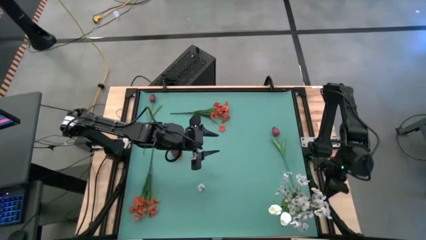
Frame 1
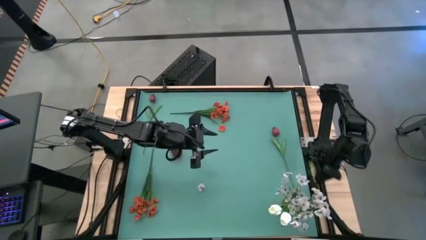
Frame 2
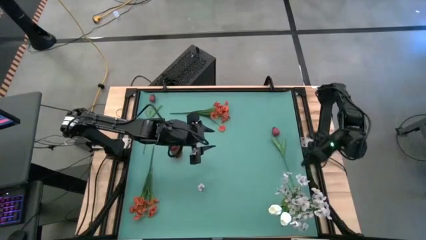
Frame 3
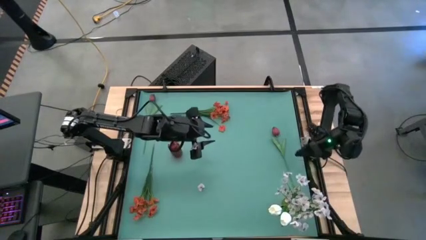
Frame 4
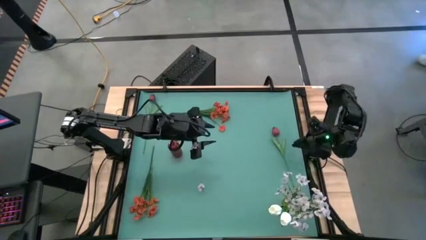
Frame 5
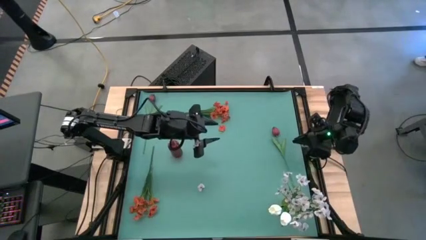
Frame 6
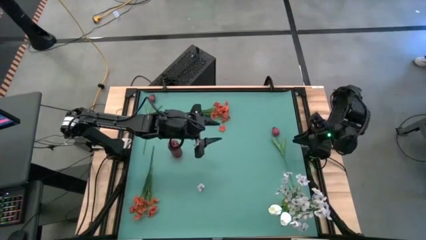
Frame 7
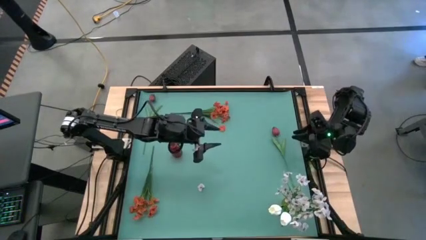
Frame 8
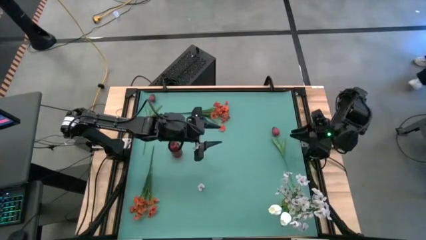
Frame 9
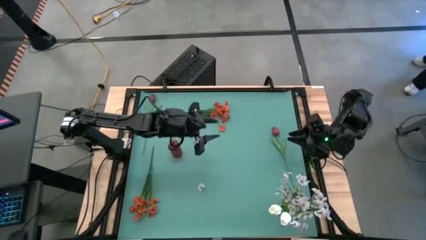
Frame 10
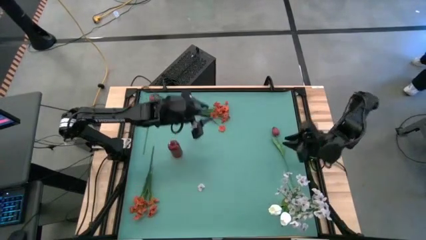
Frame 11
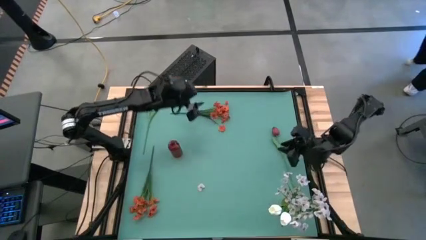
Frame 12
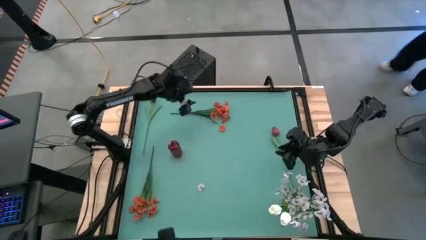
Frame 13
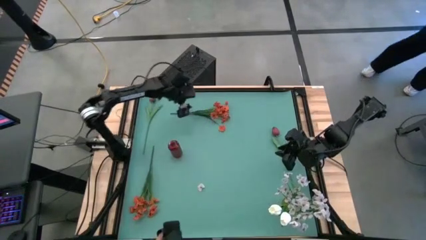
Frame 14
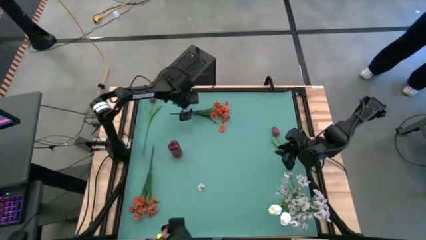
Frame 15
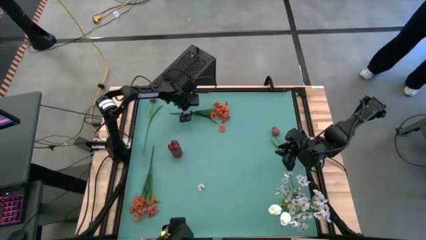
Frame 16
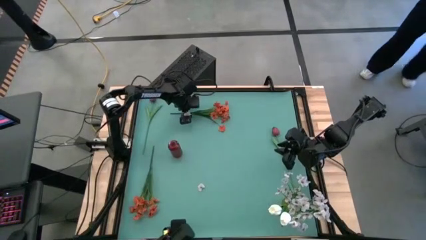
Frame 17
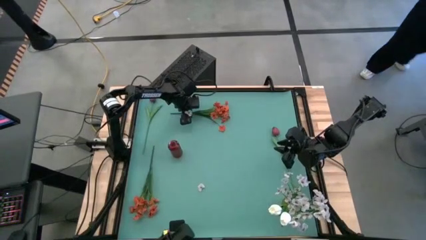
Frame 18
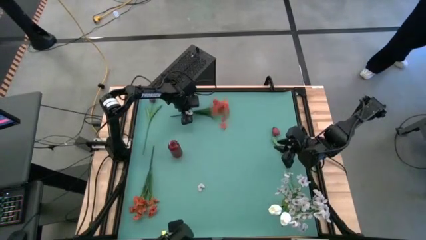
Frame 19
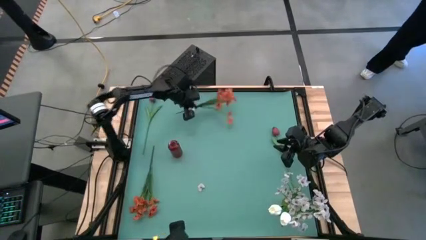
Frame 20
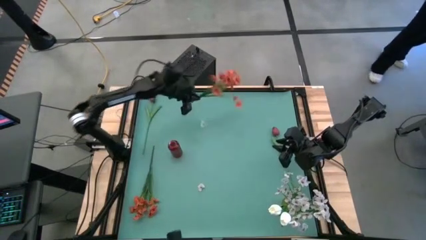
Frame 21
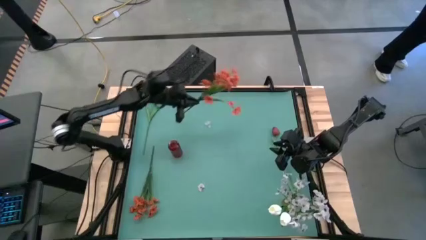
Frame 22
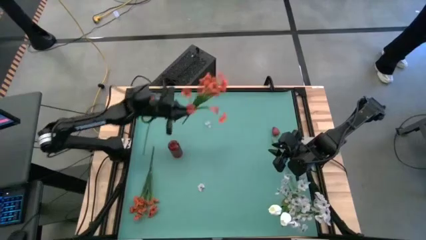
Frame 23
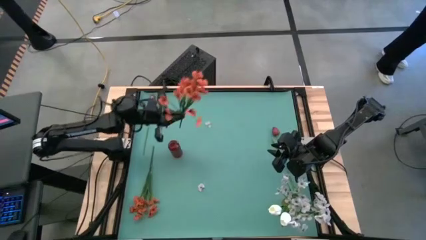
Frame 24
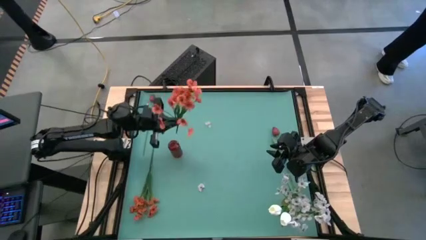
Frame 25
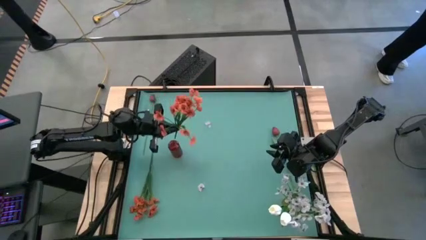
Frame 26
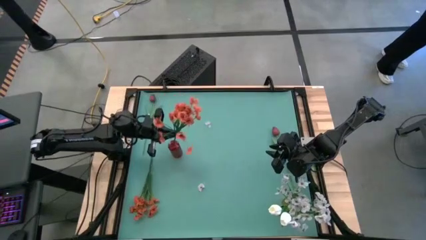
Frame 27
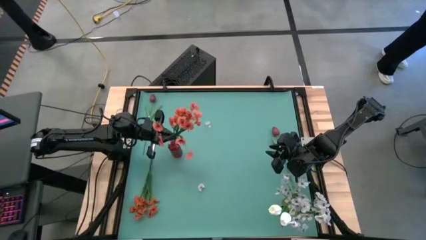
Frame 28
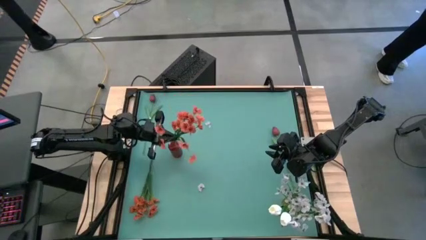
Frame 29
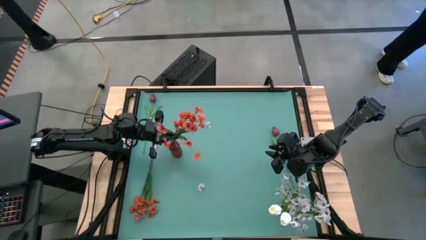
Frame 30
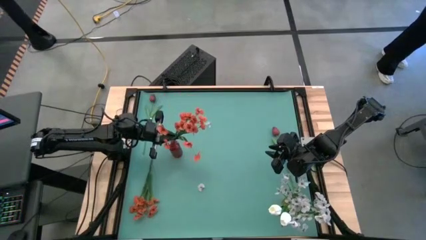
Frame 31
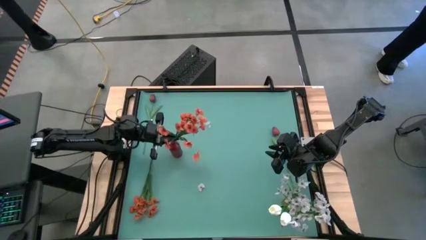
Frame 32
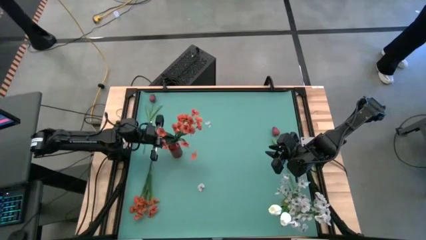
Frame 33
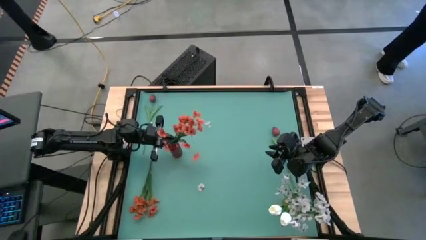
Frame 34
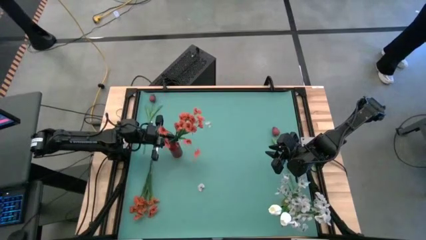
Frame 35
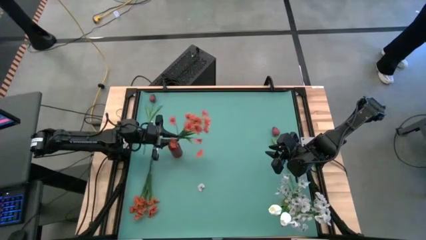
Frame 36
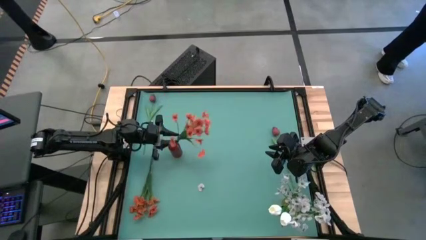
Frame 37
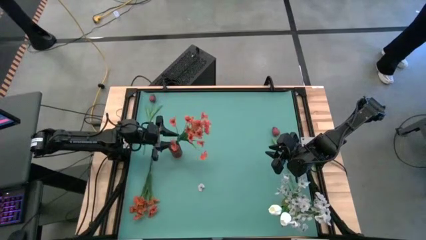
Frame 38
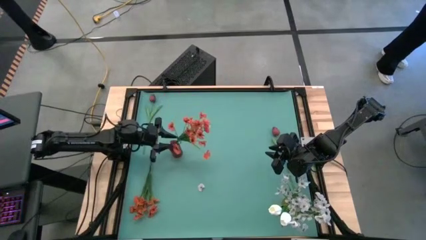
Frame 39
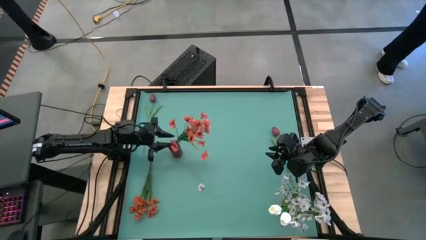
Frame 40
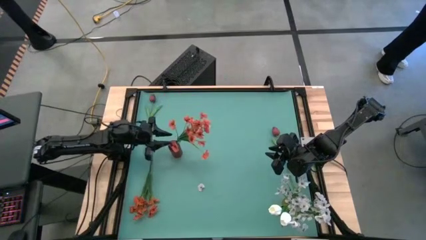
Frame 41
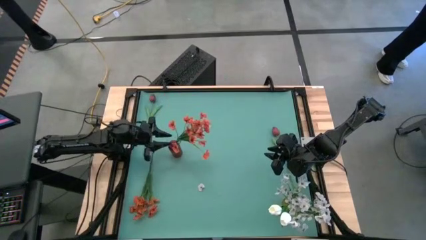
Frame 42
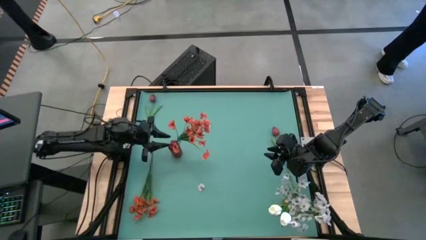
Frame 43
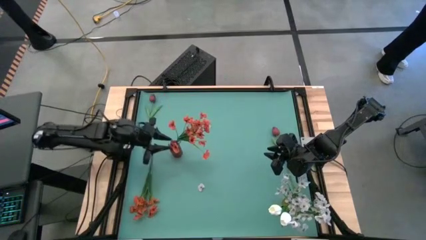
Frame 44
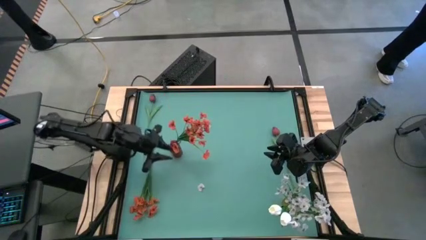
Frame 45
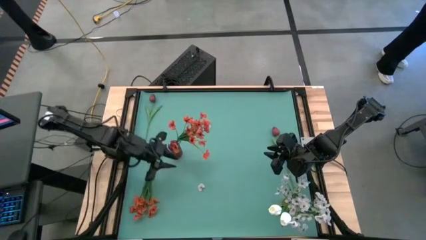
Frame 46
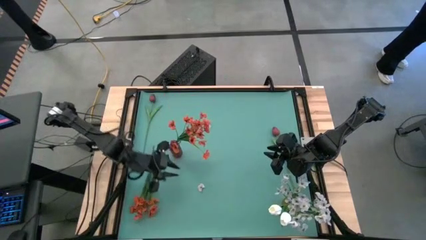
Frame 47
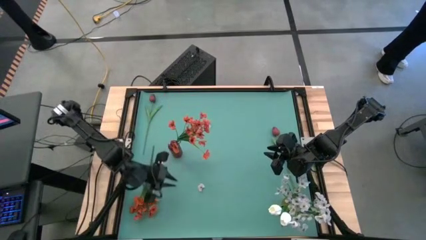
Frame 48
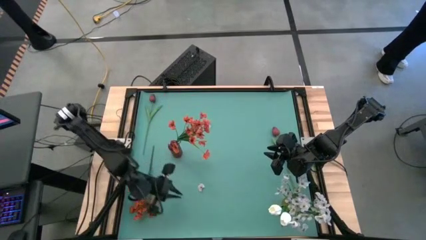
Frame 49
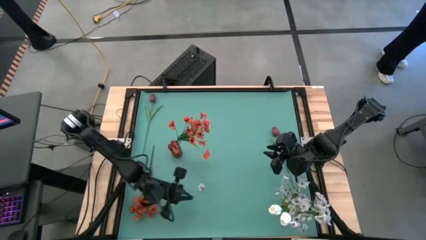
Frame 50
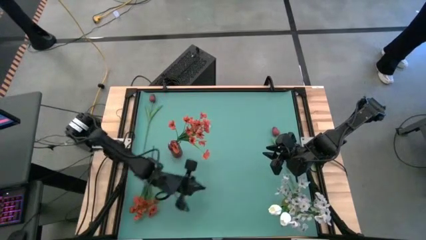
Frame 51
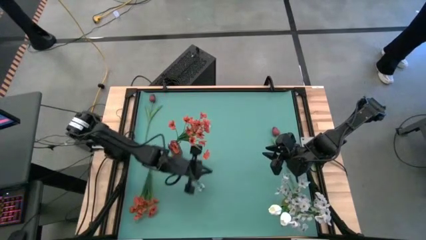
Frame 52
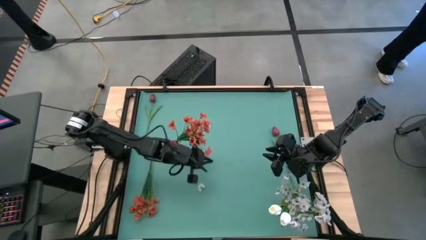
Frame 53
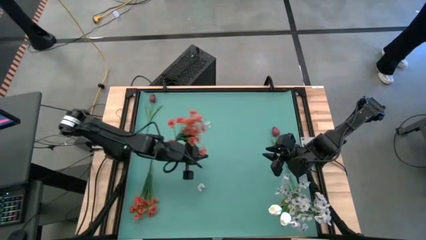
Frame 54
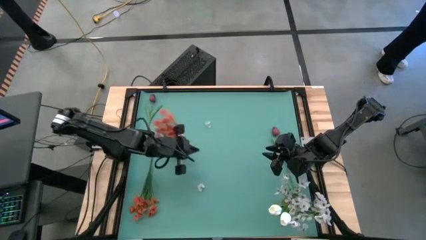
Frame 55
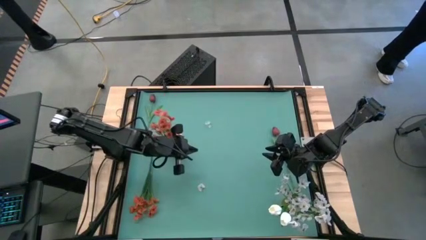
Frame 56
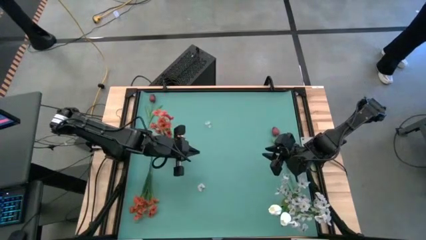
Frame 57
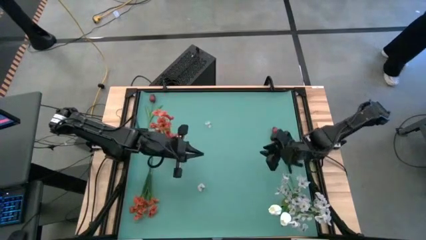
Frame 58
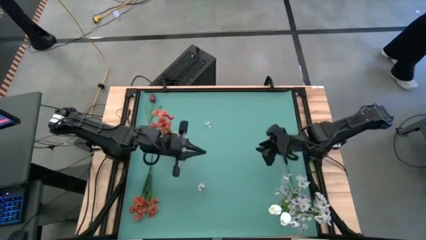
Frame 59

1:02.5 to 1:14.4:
Task: Sort flowers into vase by color
Put the top orange flowers into the red vase

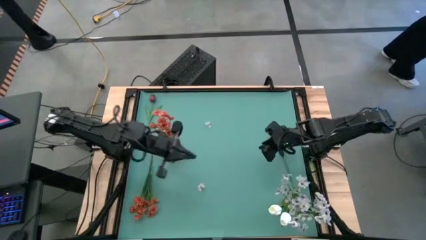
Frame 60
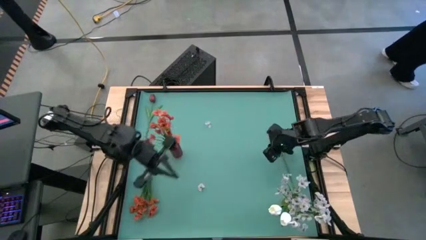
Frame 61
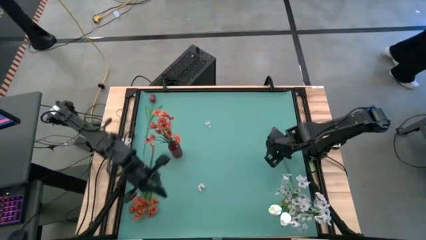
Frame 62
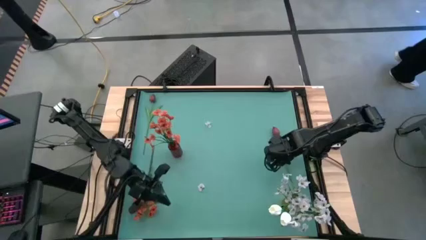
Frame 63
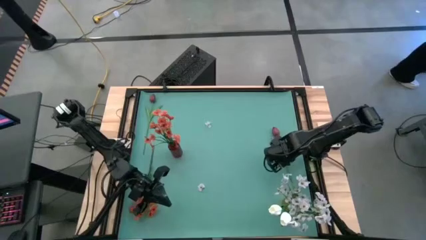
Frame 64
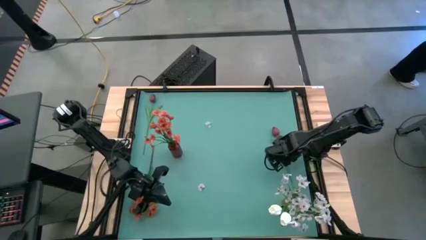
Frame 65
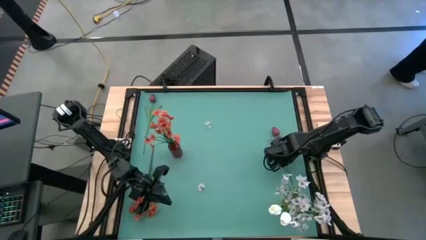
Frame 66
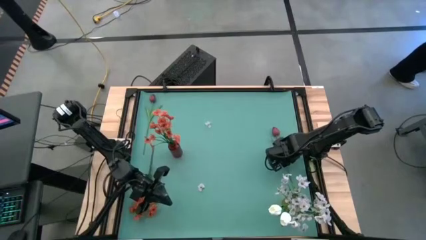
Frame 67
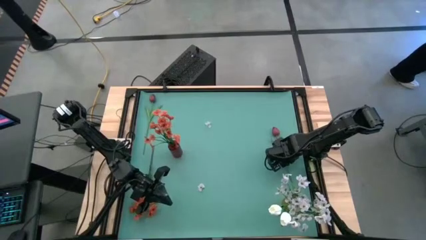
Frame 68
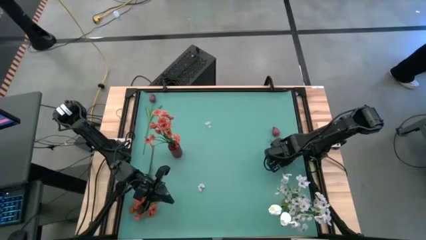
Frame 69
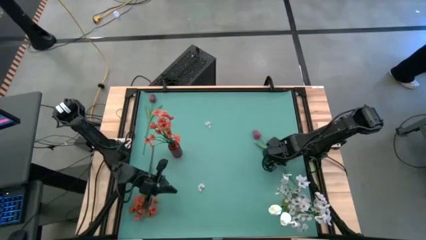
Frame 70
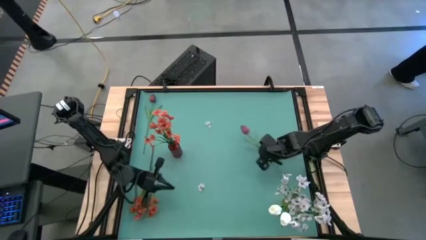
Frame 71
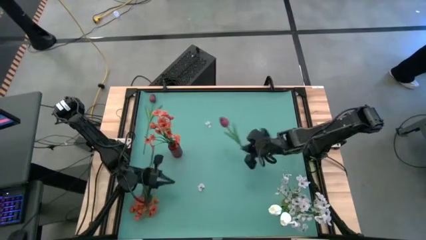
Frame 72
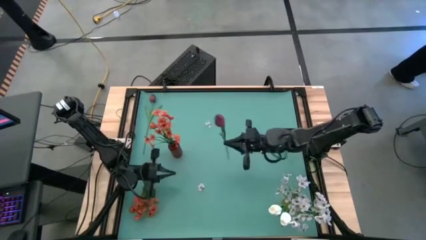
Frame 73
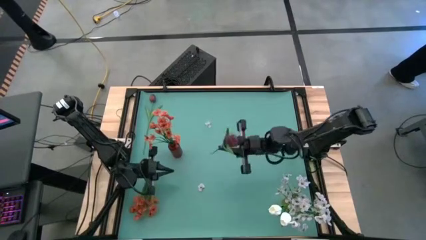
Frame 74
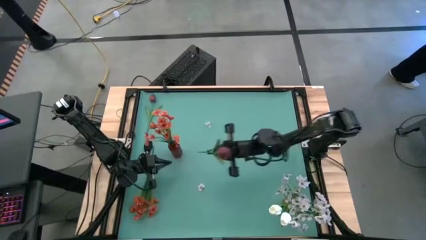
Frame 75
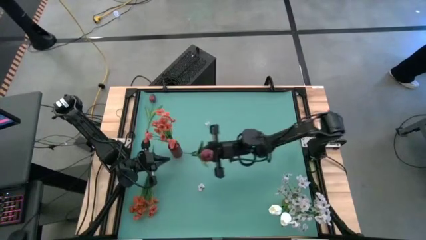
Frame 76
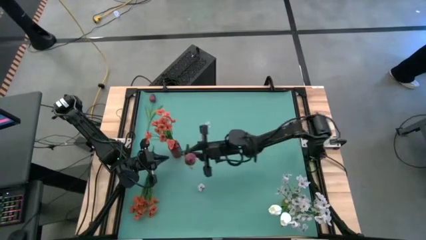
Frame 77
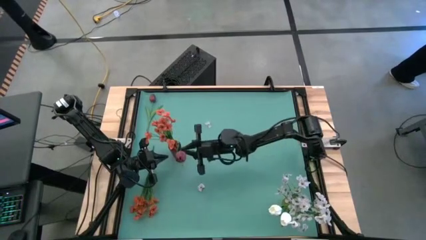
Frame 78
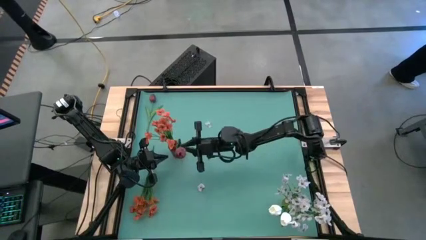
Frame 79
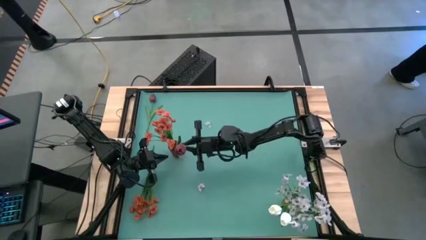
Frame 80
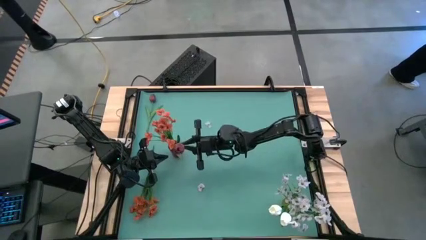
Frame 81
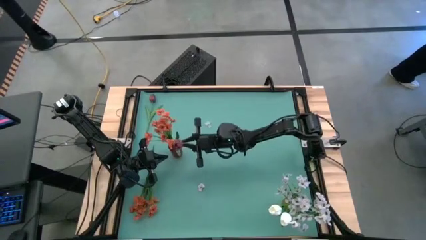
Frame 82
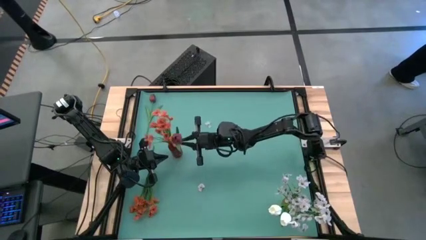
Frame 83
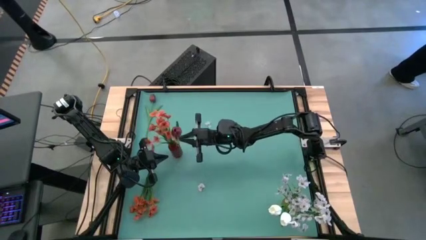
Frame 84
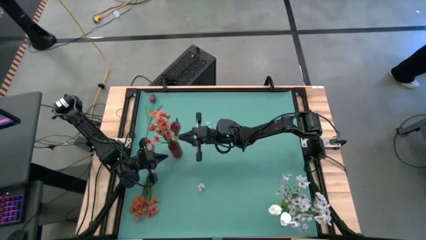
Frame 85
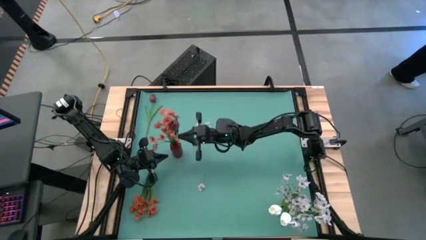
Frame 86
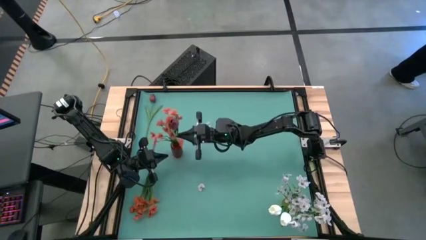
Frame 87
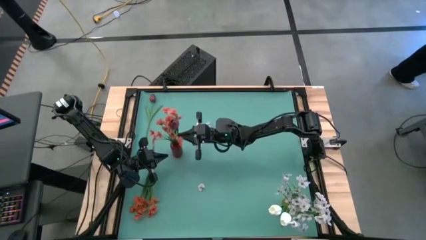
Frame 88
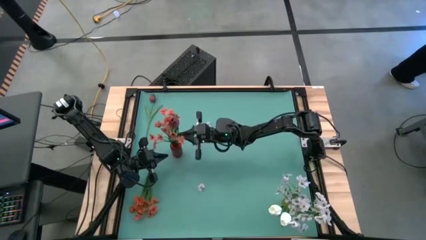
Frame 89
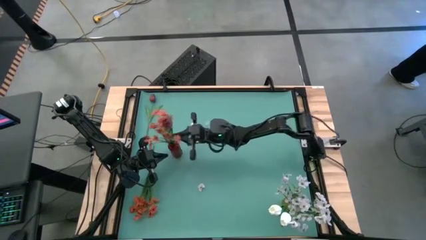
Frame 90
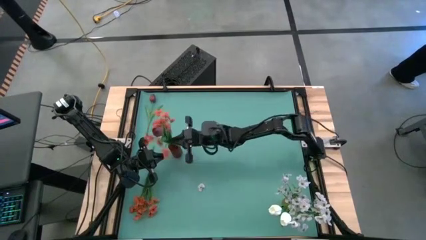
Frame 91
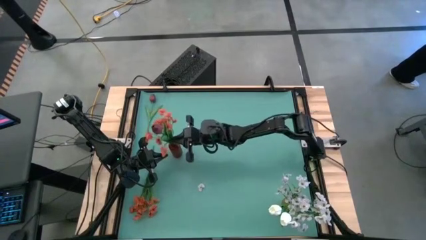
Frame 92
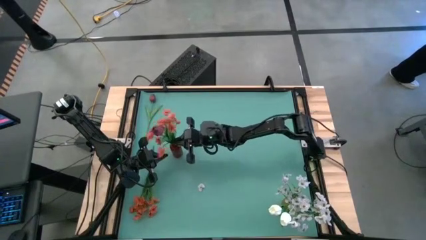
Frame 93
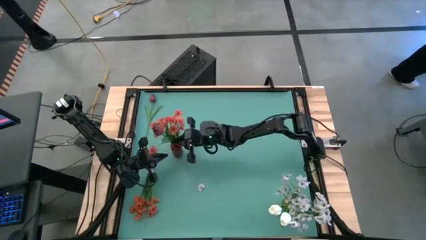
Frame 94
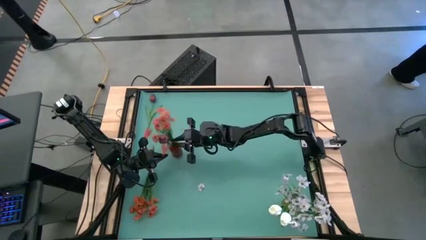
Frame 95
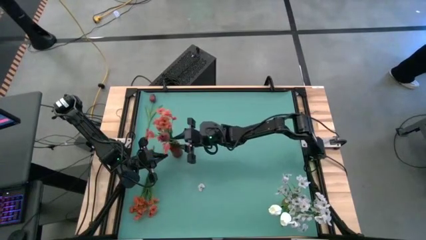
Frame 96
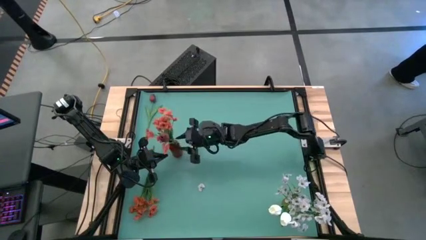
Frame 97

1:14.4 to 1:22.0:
Put the right dark red flower into the red vase
